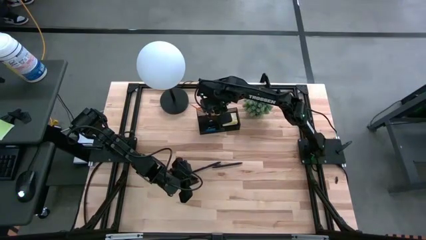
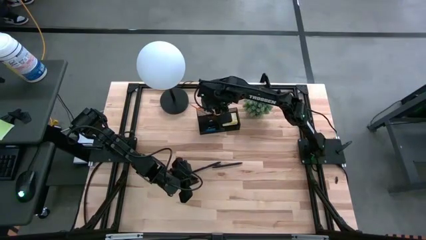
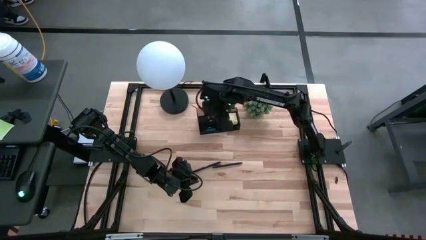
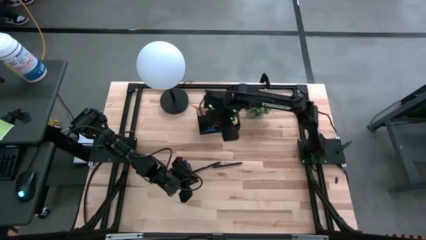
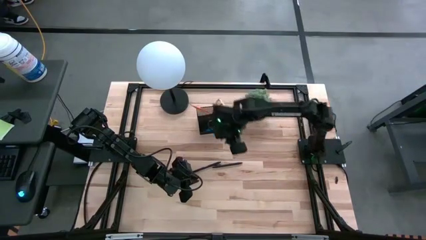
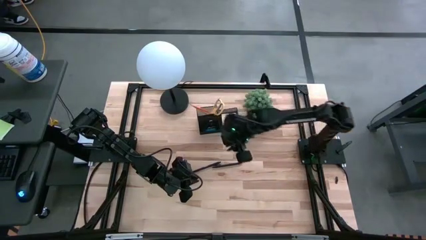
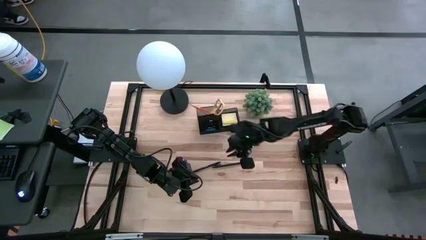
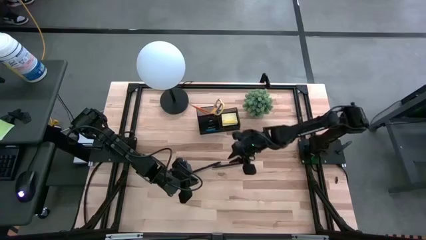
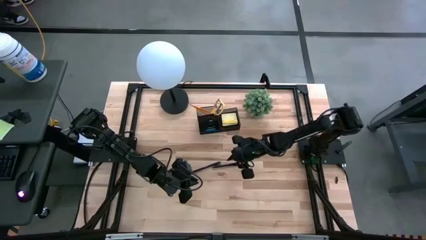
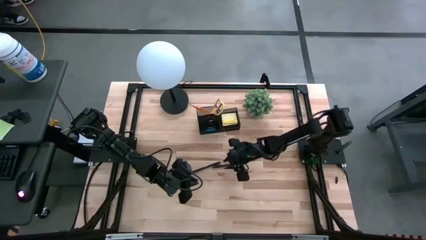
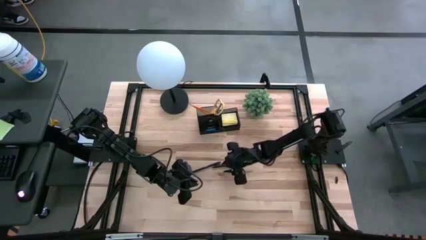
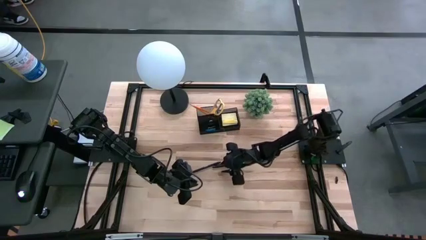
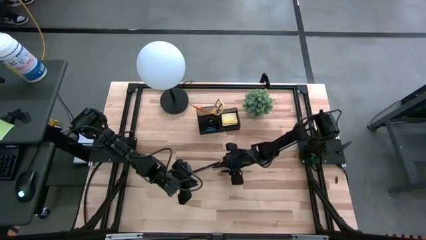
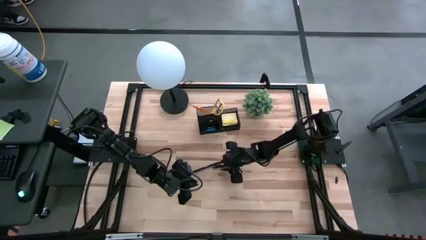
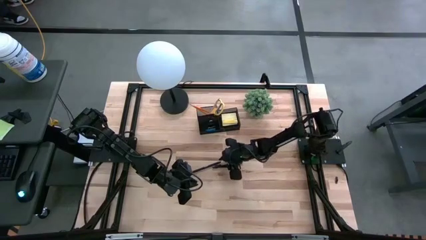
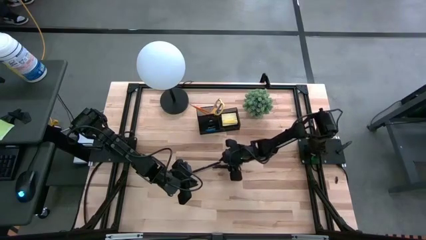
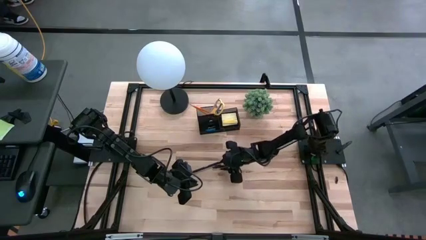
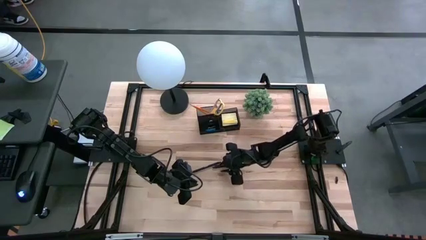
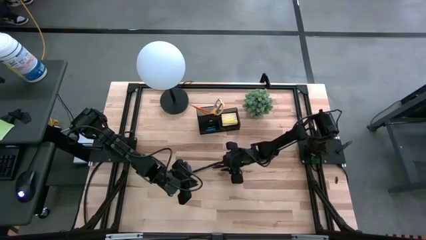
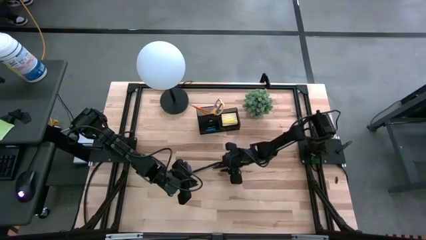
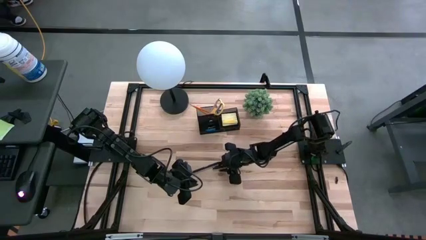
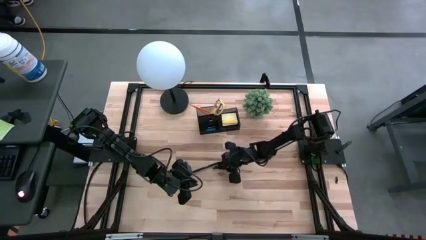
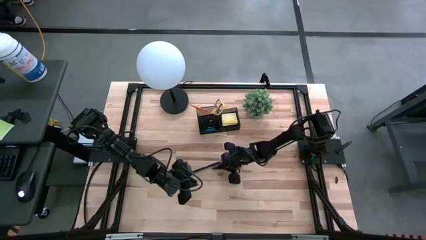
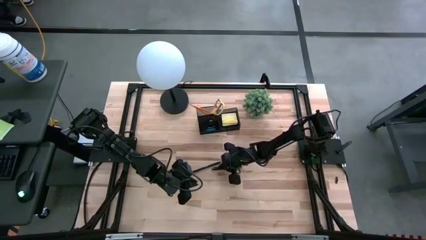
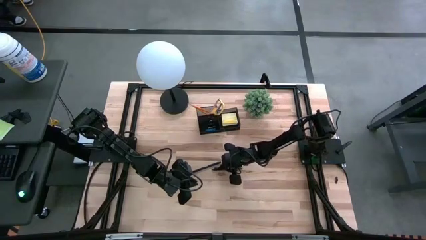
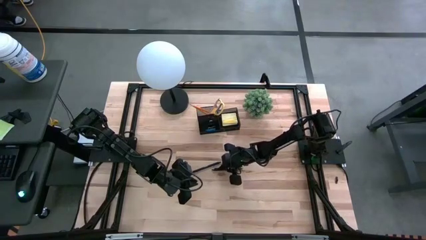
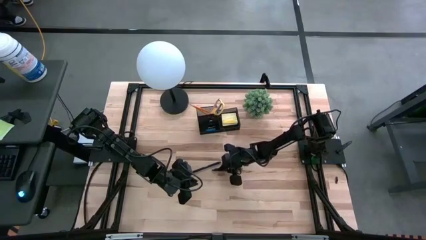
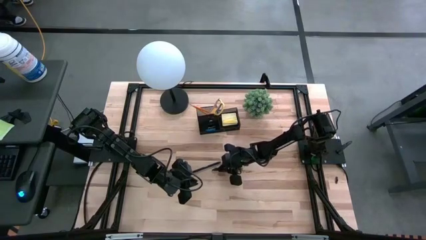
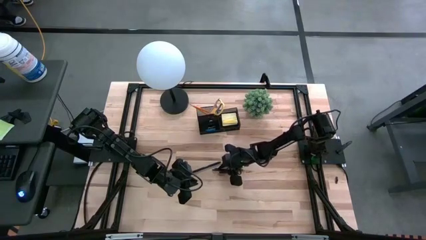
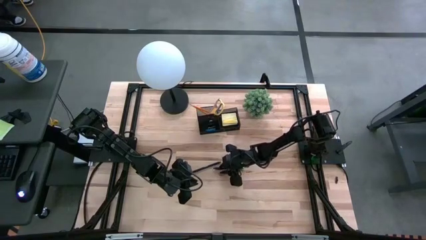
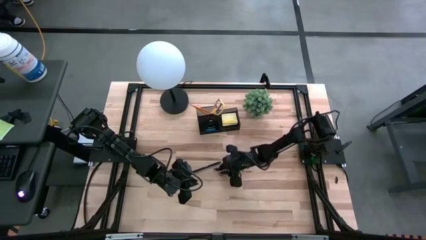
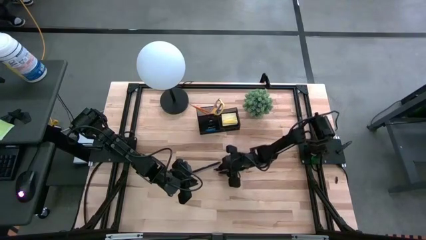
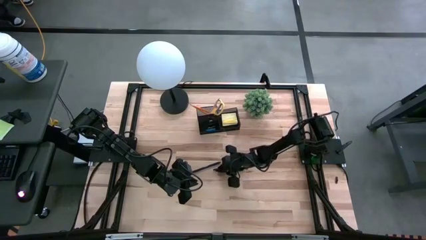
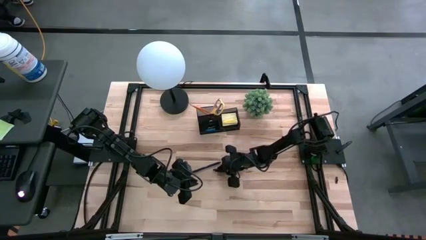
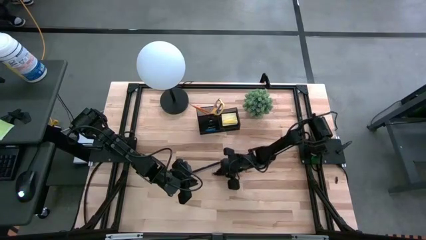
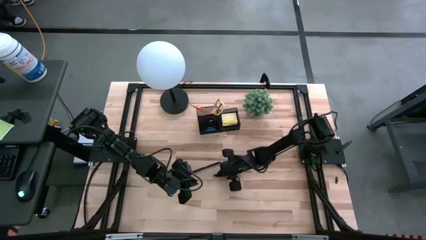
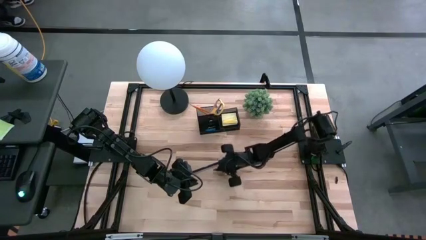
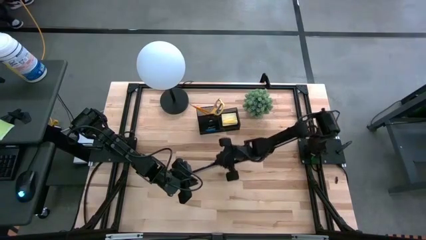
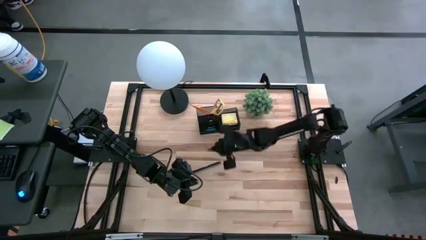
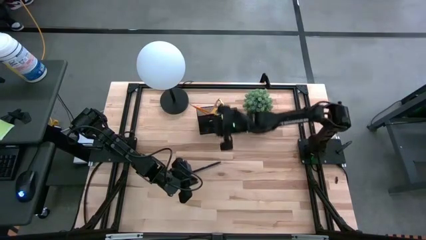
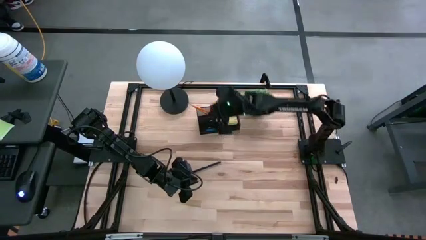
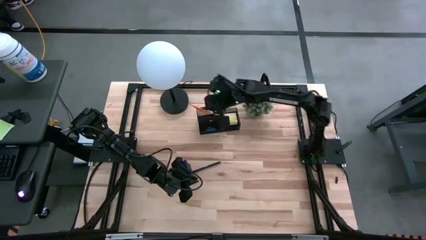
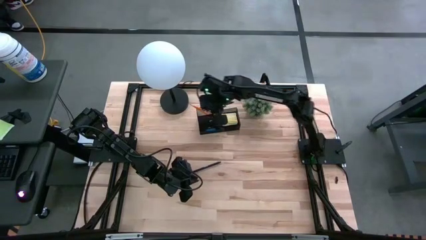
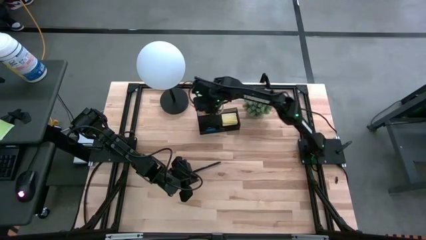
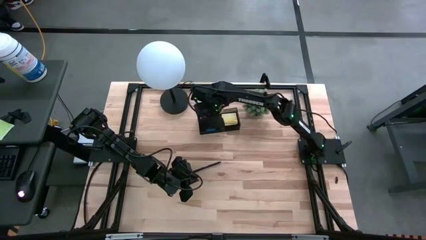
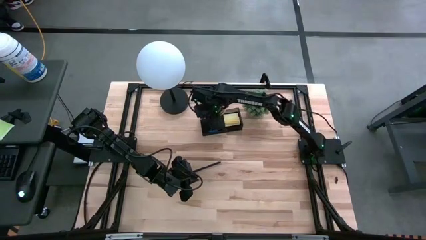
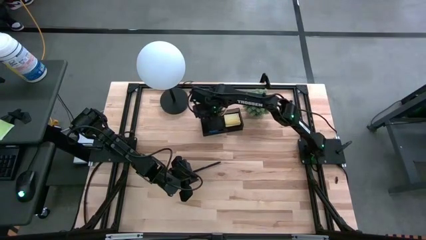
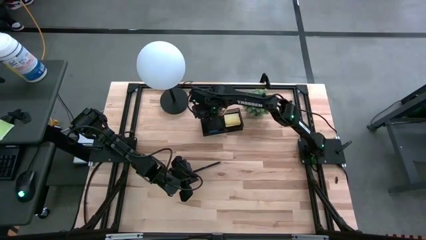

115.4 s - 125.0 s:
Task: Pick and place office supplies into organizer
Put the bottom pen into the desk organizer

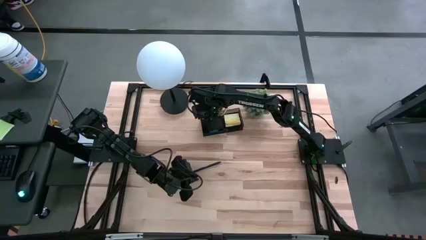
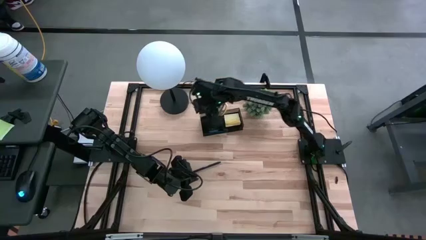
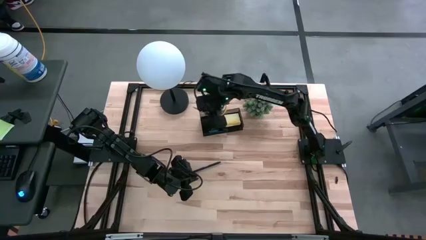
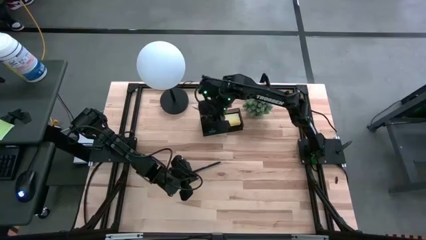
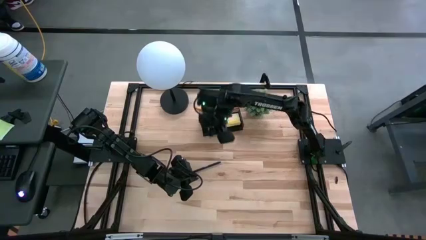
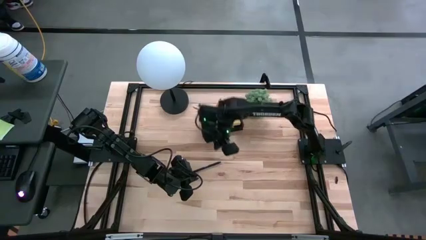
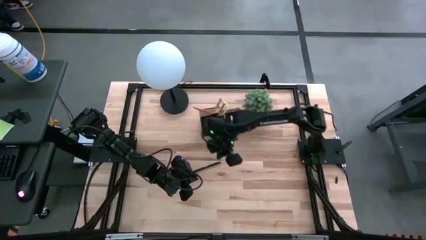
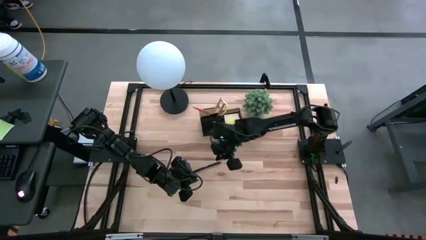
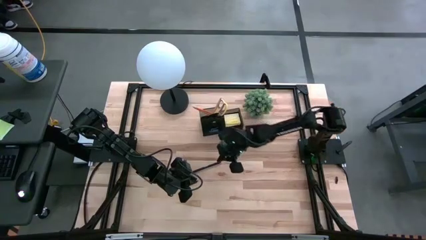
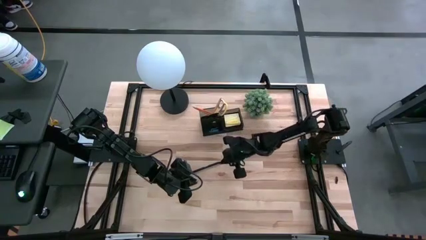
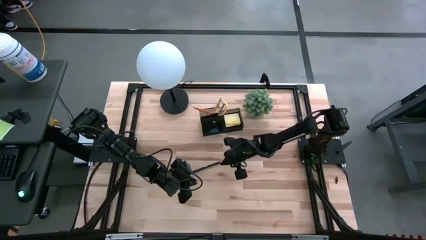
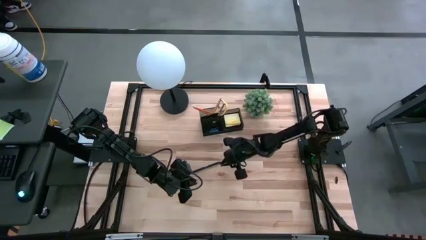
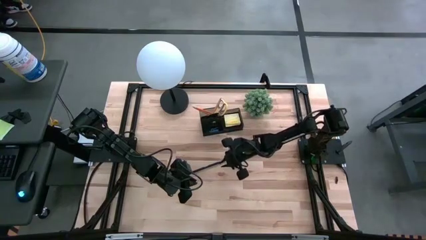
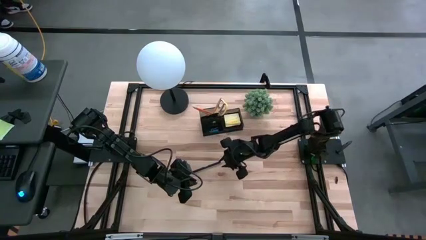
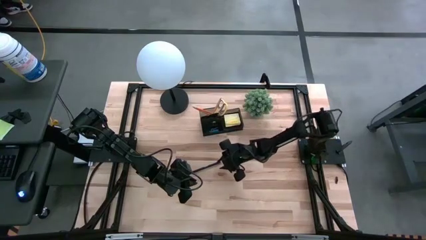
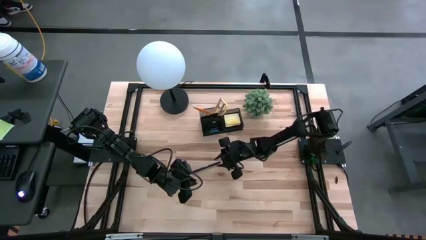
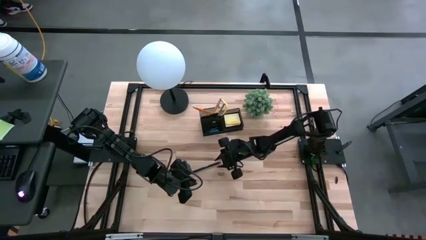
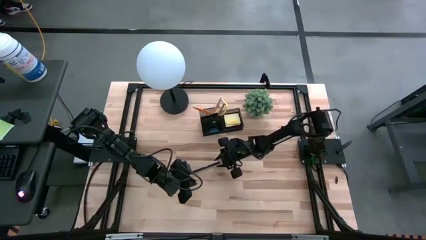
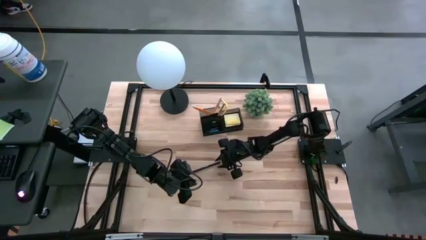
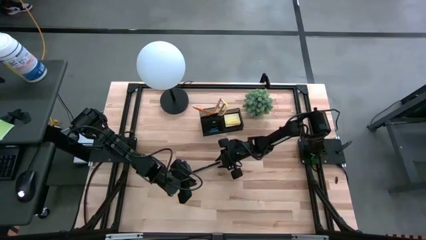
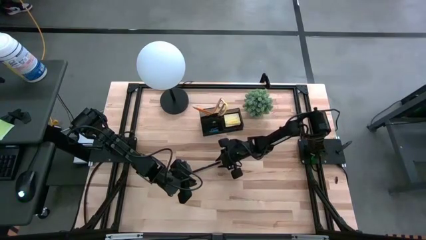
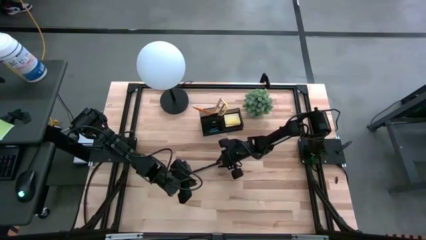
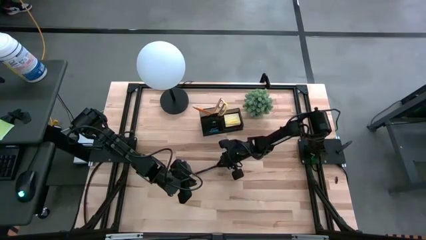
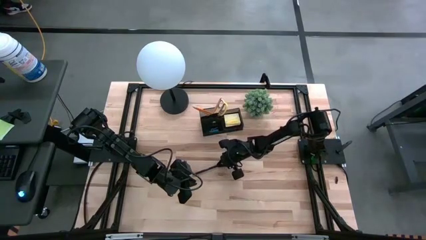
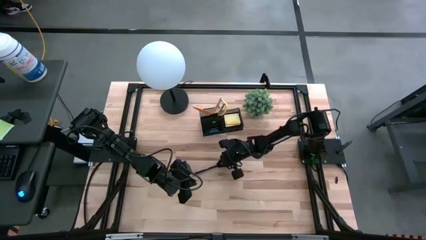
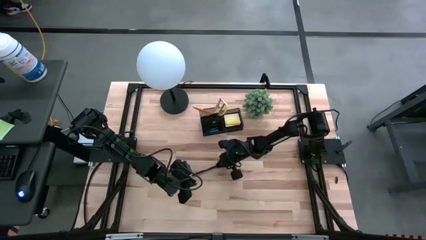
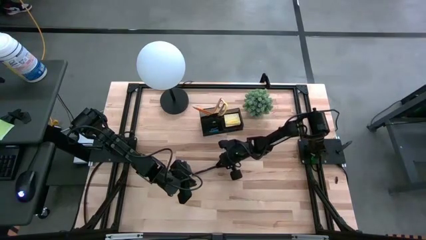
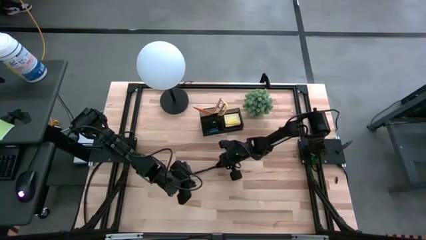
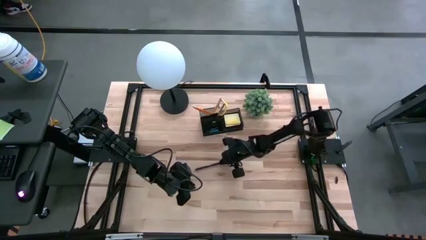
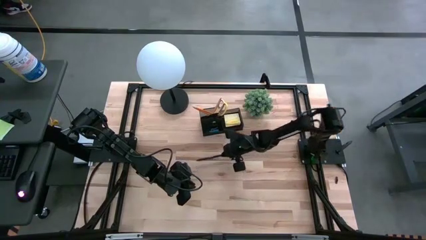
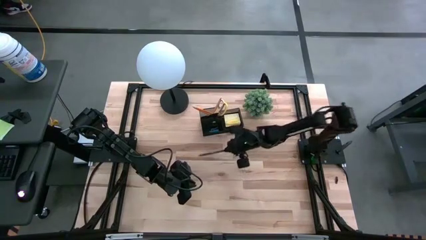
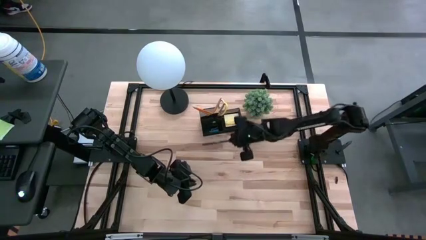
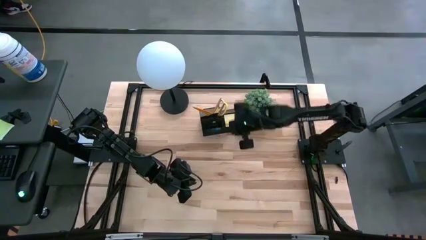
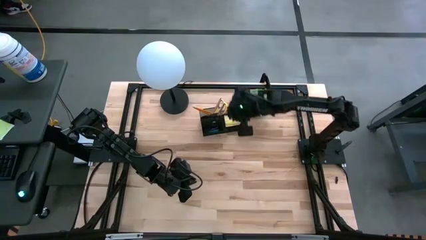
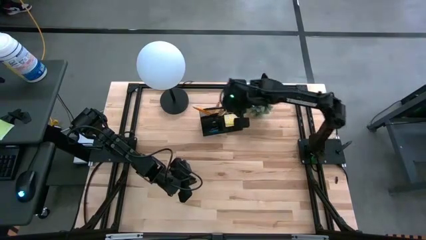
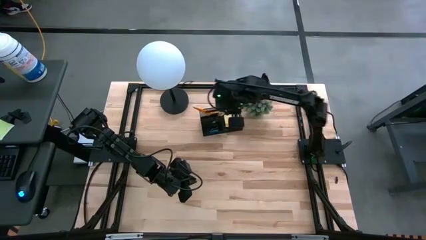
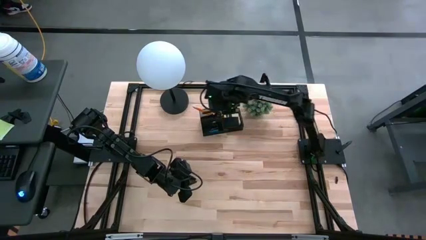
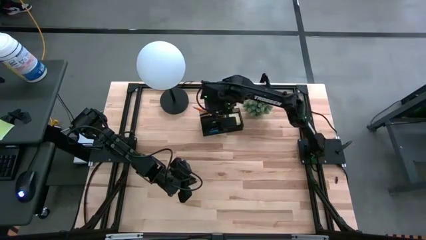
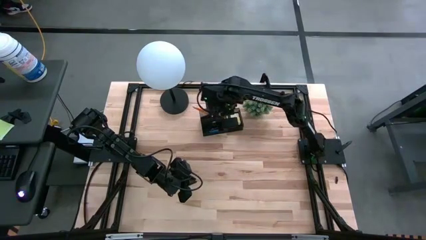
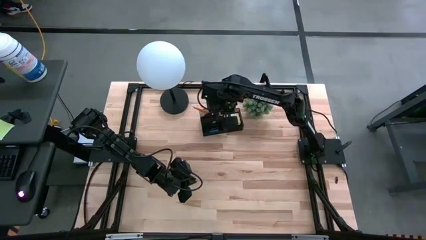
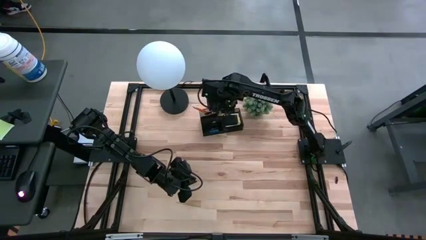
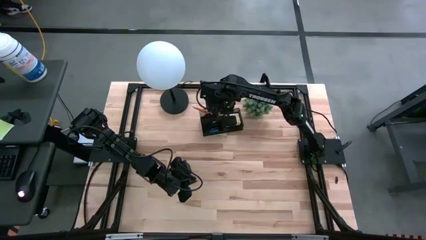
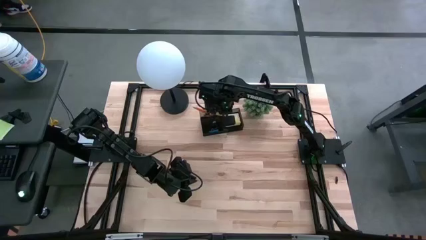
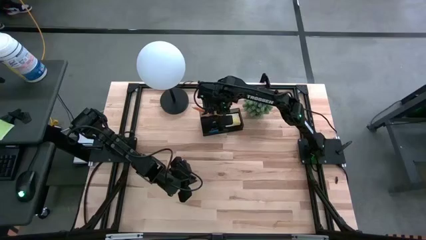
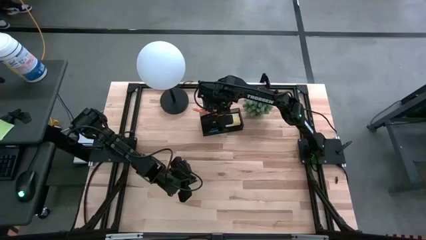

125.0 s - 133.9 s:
Put the pen into the desk organizer
